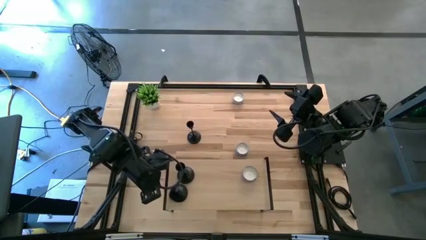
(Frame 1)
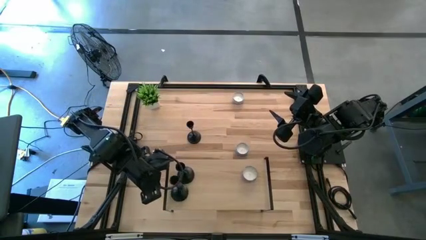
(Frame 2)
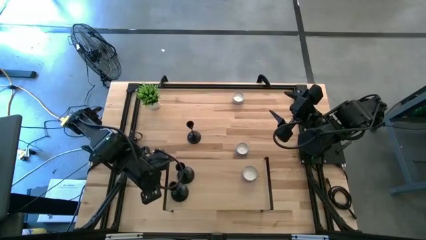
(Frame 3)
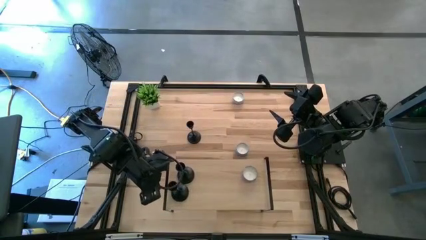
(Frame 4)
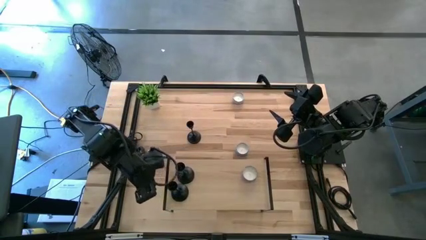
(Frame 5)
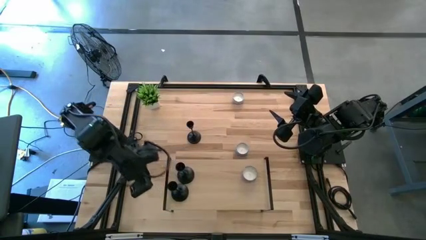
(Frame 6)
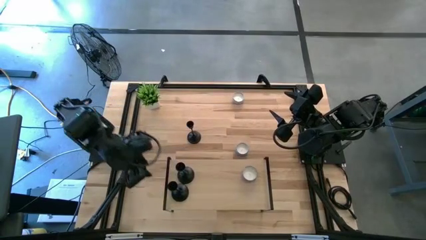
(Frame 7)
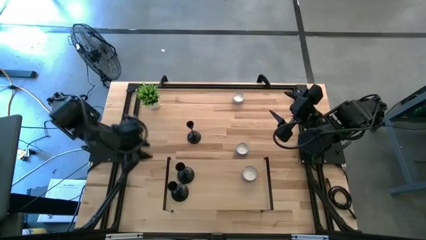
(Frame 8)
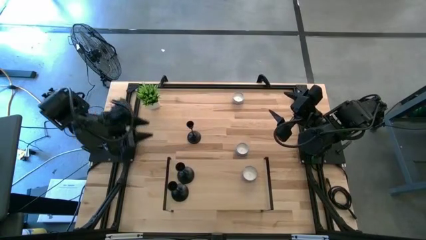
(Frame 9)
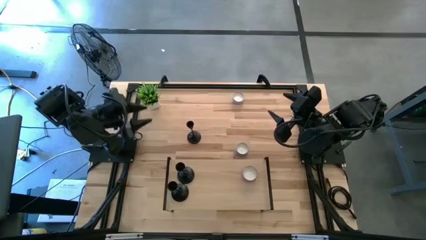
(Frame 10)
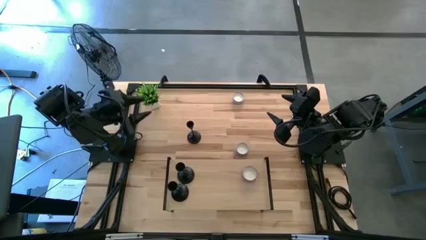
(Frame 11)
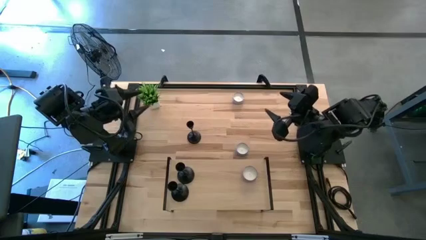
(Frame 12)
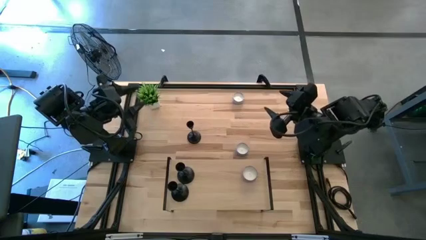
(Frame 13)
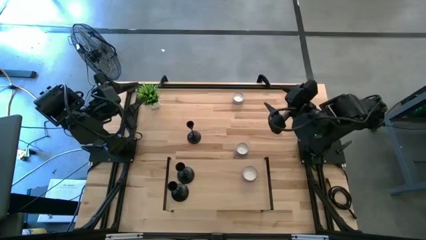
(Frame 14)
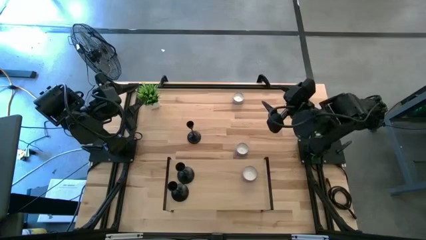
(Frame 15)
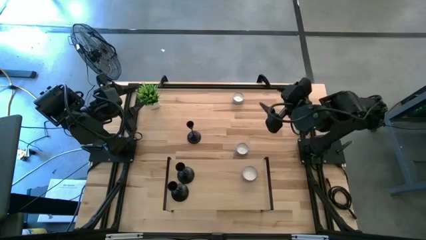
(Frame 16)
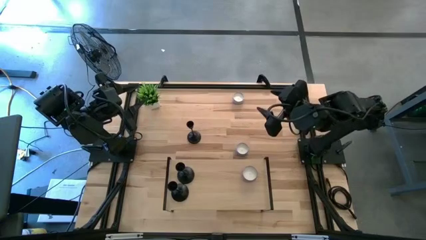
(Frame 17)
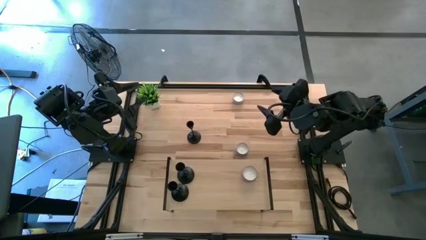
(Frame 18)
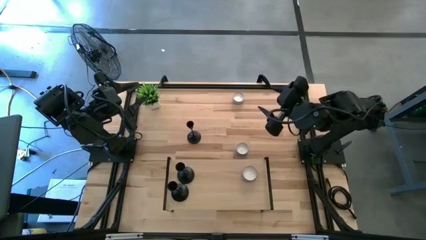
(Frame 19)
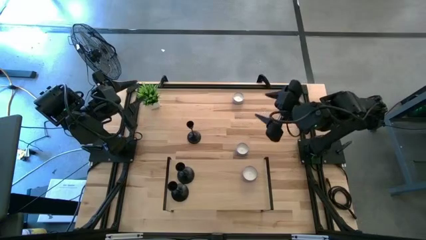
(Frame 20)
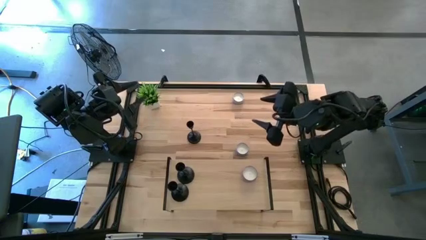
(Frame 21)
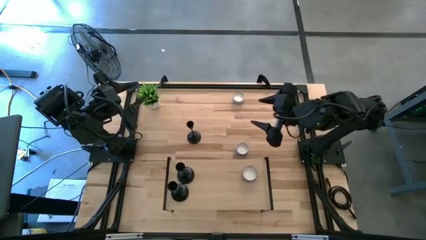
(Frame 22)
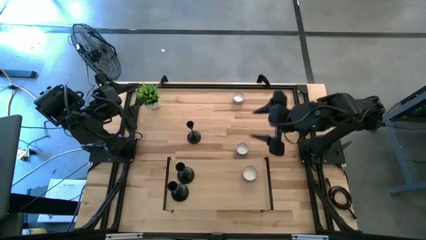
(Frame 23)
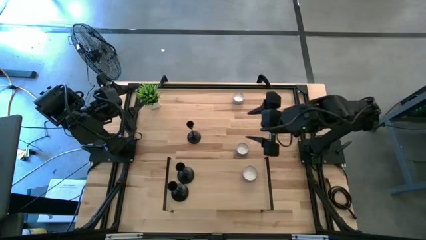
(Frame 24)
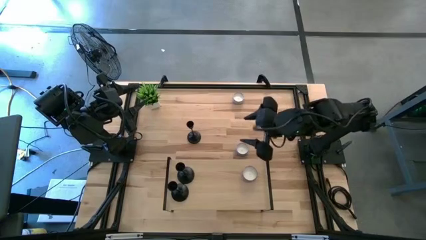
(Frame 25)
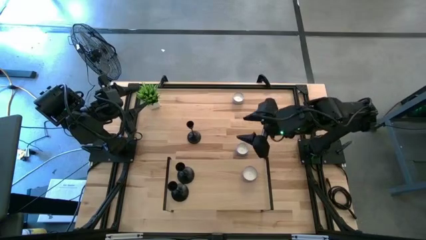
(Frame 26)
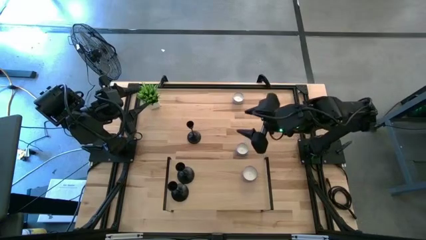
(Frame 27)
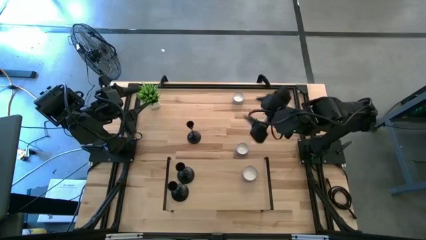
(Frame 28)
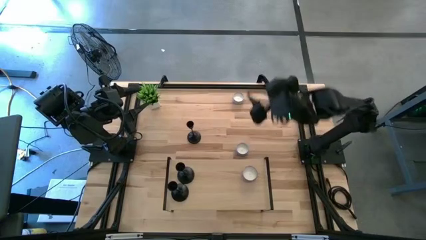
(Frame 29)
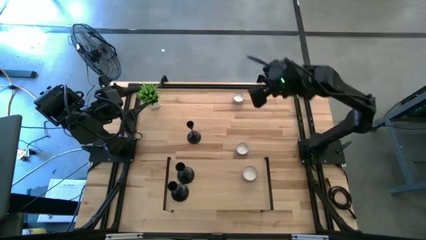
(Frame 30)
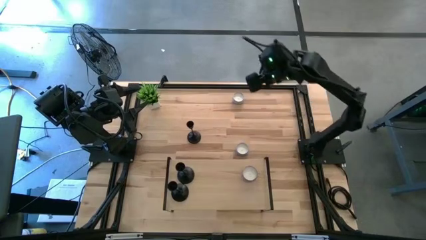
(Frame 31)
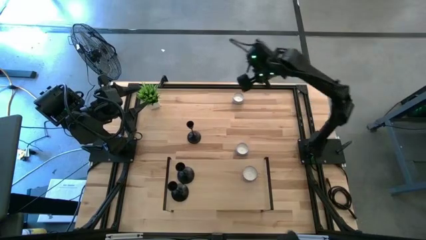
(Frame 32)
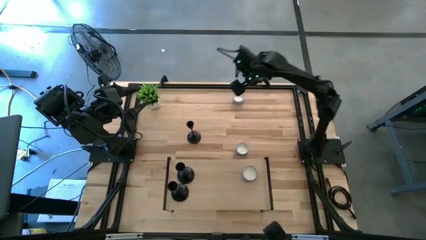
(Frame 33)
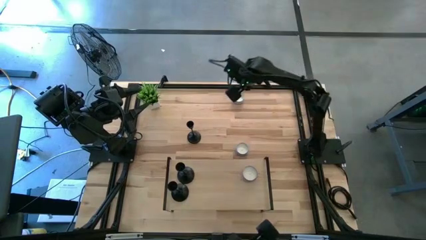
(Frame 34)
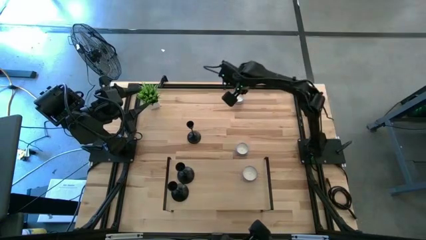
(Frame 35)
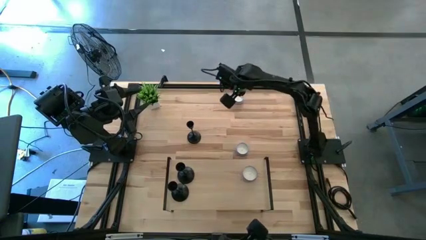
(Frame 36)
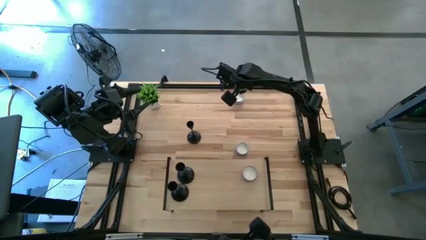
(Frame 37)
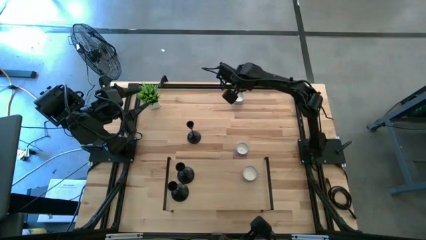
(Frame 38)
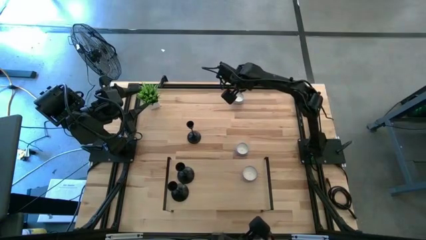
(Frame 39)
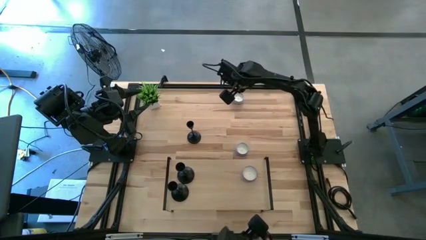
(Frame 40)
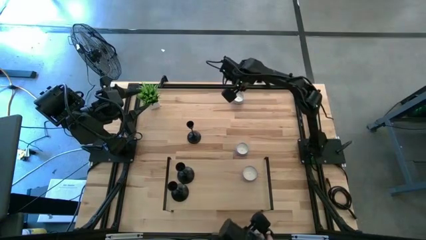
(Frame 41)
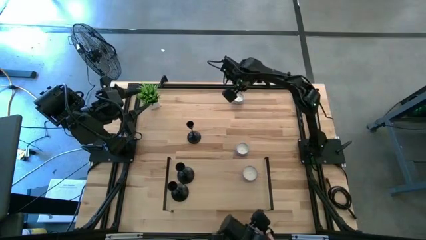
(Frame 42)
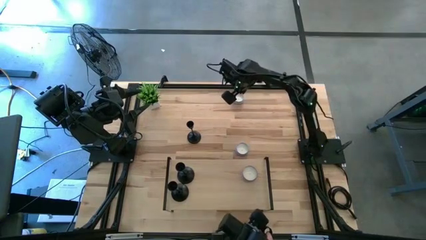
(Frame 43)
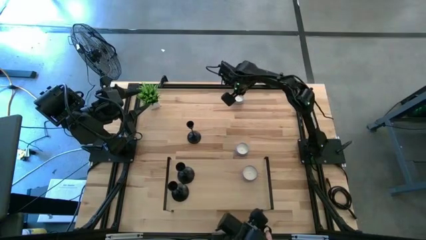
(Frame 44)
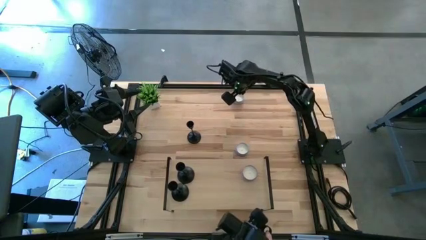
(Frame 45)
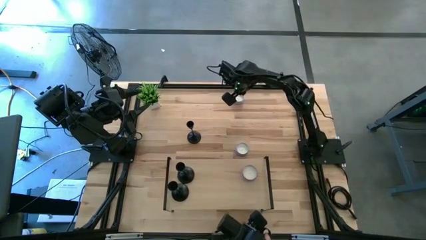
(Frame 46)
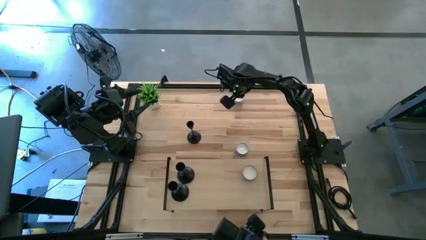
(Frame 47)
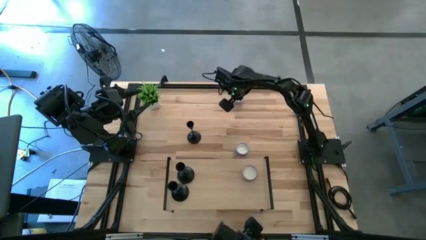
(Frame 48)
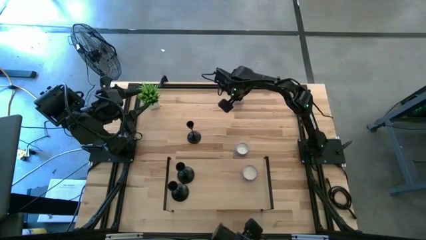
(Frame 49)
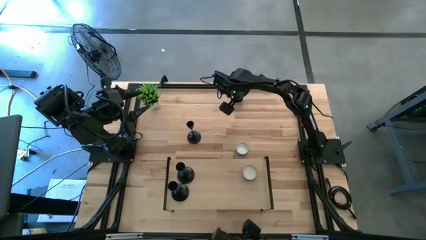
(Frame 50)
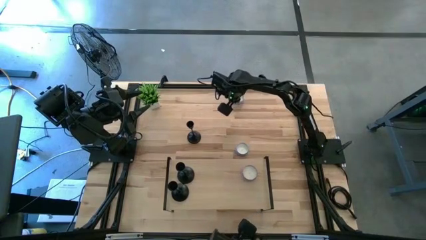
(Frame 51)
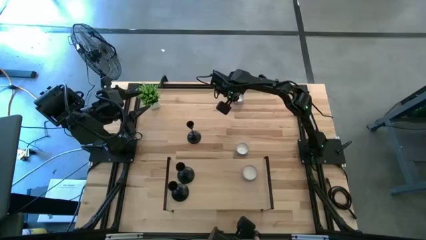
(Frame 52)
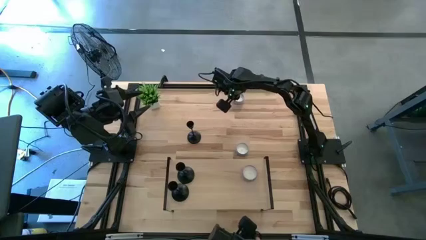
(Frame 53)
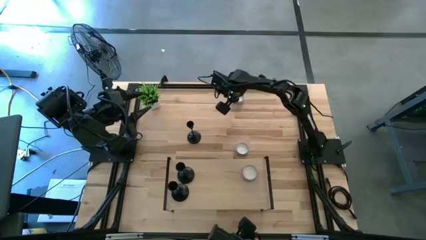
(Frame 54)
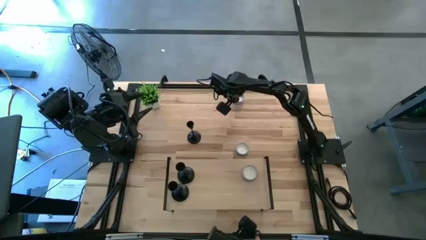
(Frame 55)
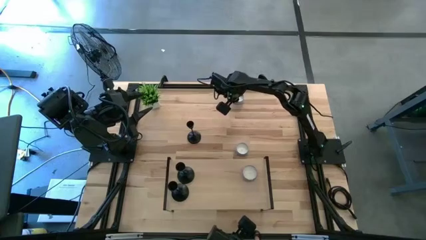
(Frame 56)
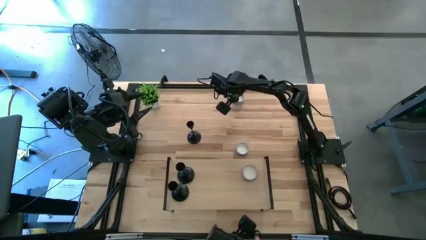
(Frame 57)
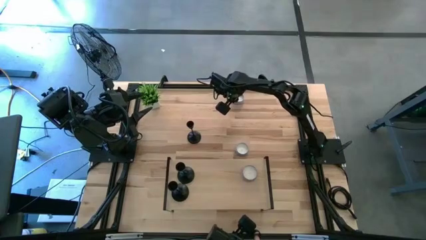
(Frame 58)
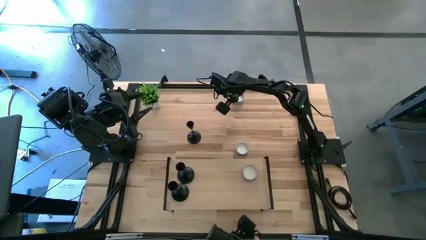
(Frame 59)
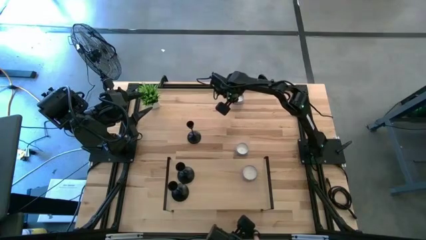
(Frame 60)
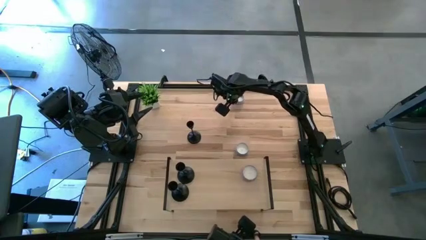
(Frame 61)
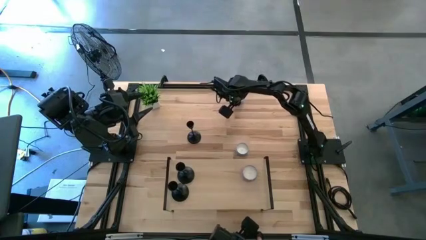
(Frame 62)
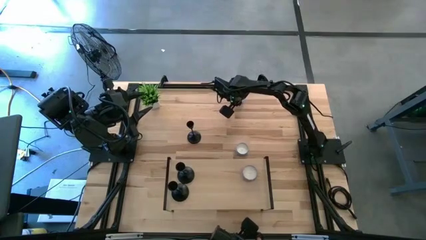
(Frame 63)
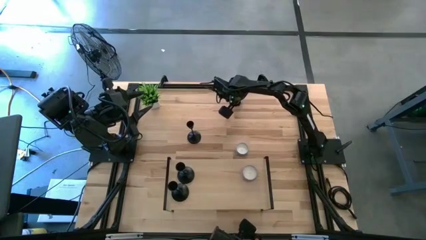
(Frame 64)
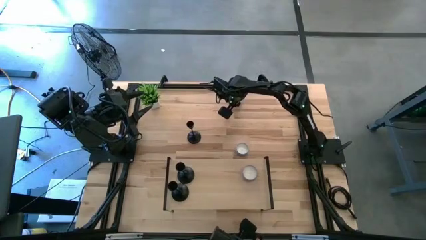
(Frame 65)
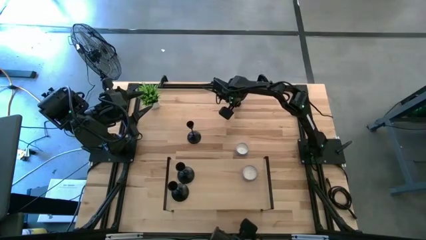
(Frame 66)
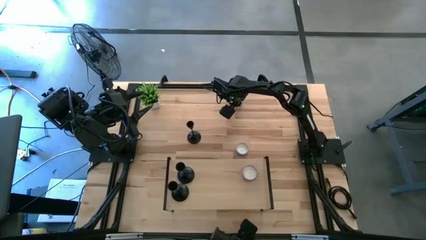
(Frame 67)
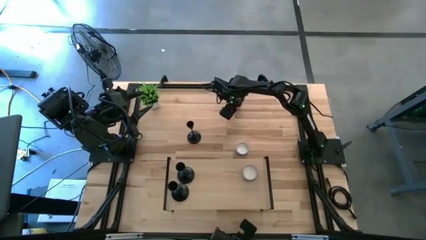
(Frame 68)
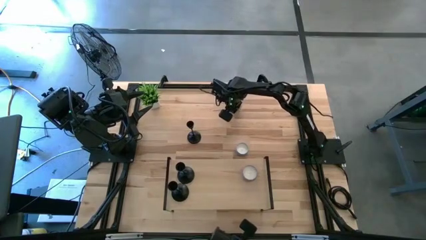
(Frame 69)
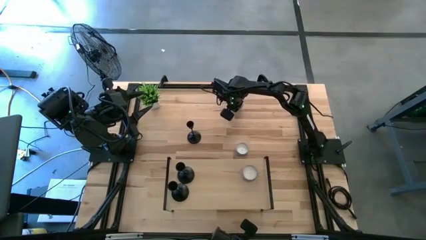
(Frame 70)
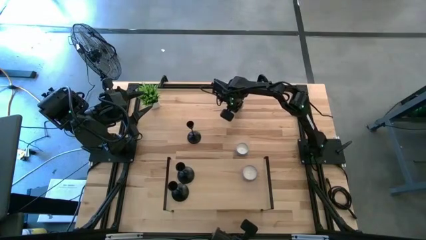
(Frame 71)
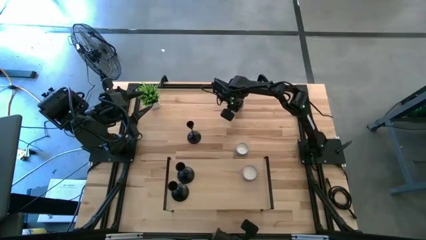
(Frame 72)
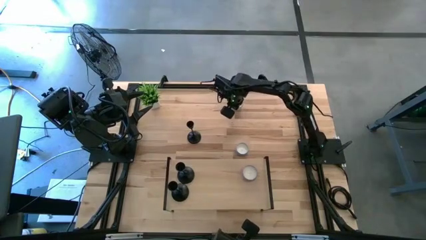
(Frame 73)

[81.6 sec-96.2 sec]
Task: Pick & Place candle stick holders
Put the red scented candle on the shelf
